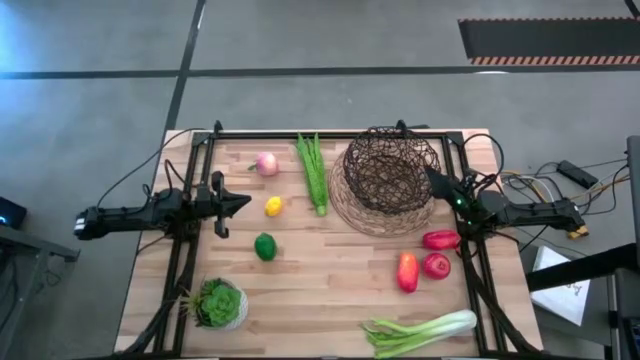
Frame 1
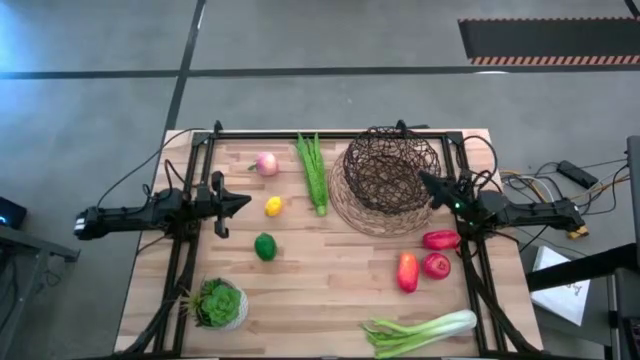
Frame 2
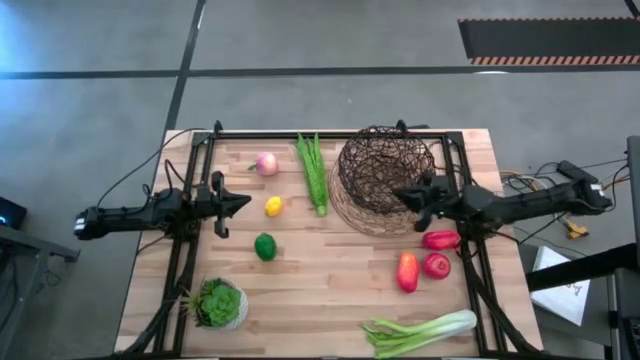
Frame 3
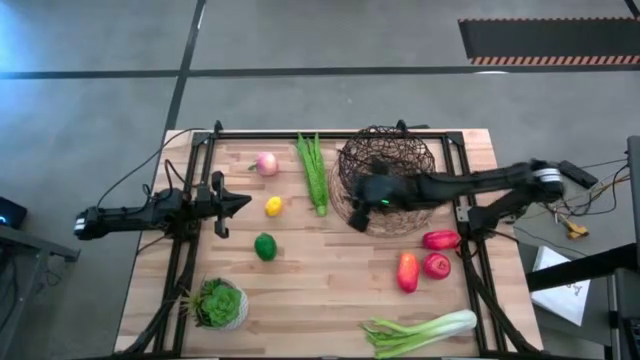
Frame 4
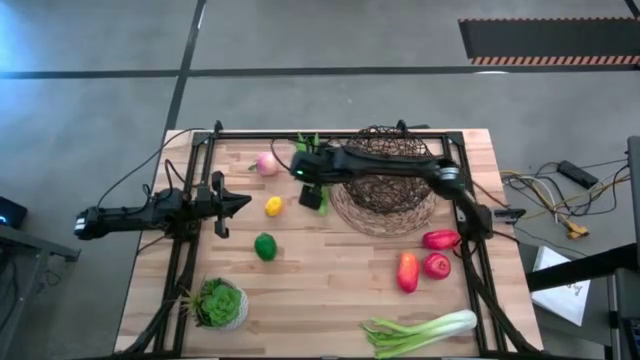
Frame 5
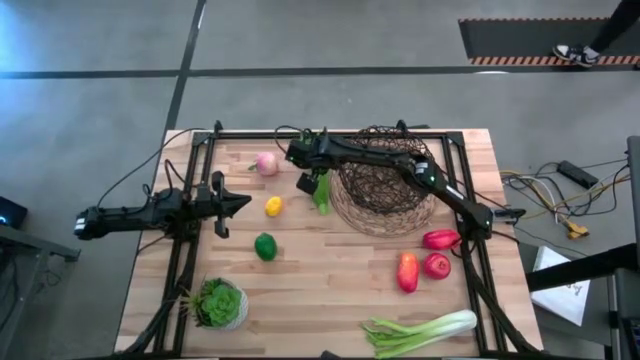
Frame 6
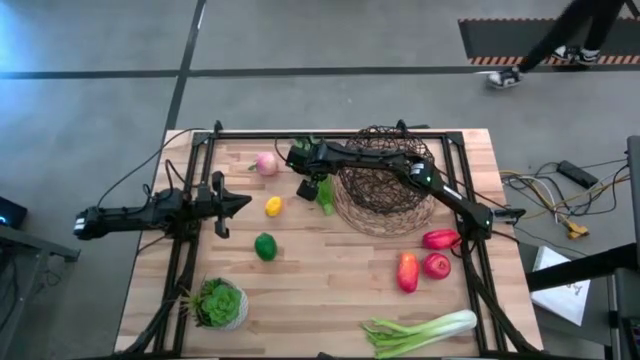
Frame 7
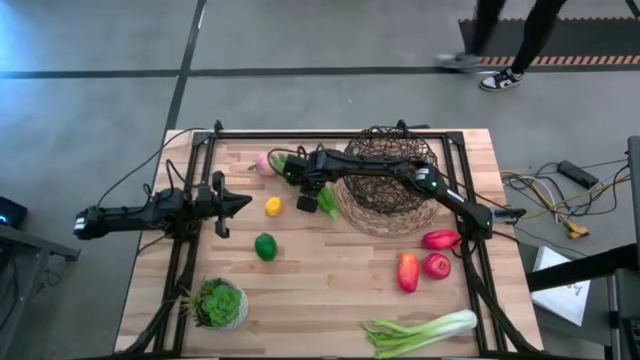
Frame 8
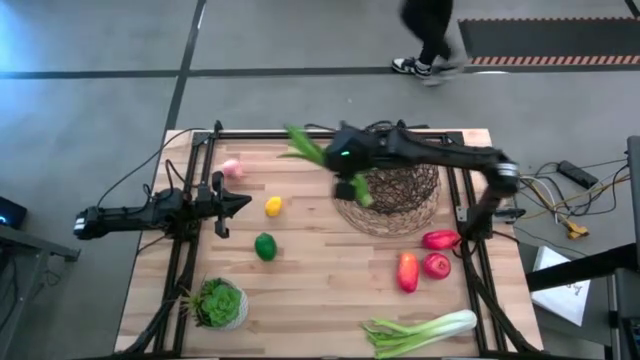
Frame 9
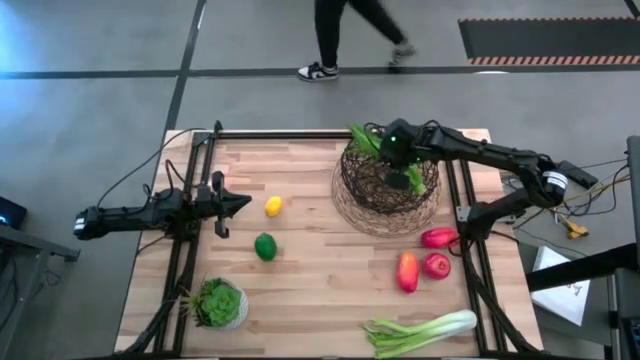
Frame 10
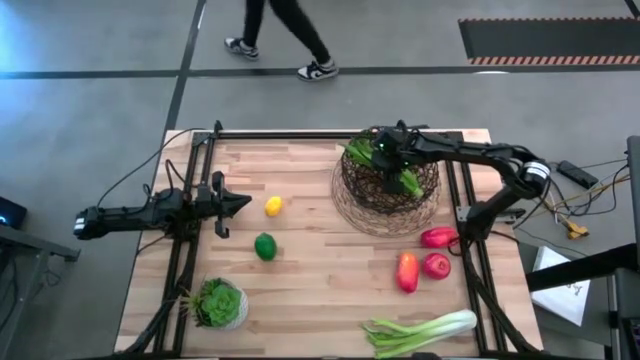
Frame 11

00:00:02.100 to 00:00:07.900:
Task: Build produce basket
Put the green lettuce into the wire basket

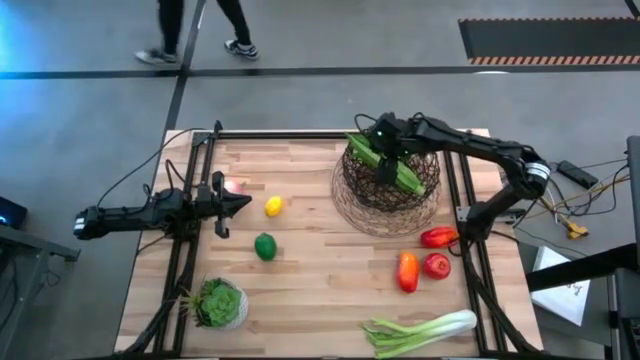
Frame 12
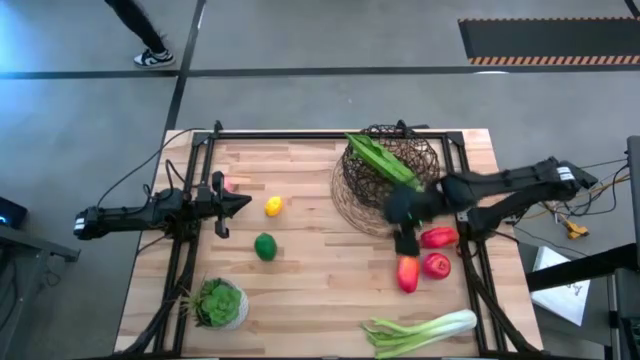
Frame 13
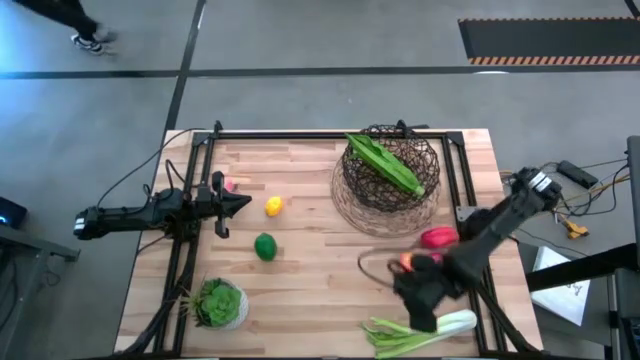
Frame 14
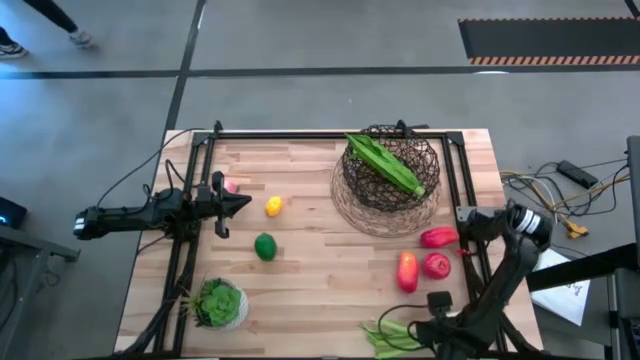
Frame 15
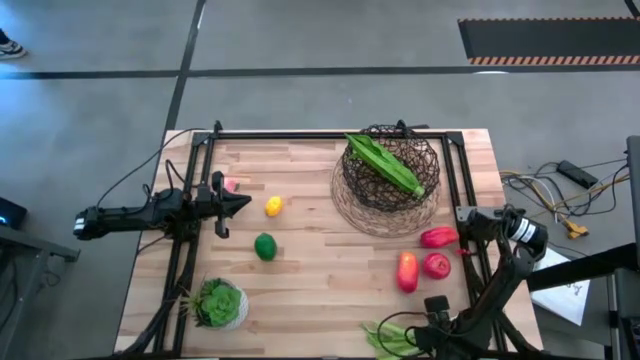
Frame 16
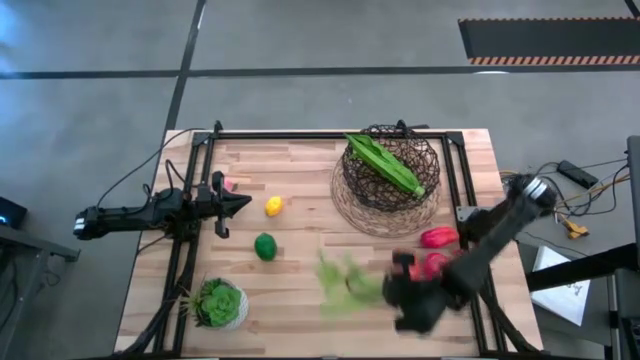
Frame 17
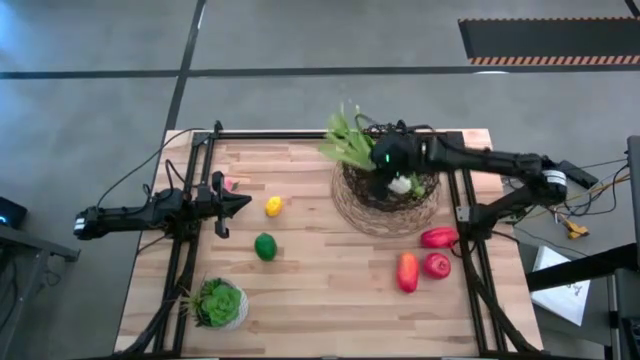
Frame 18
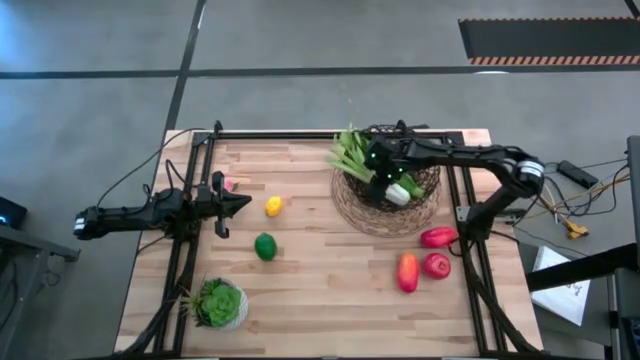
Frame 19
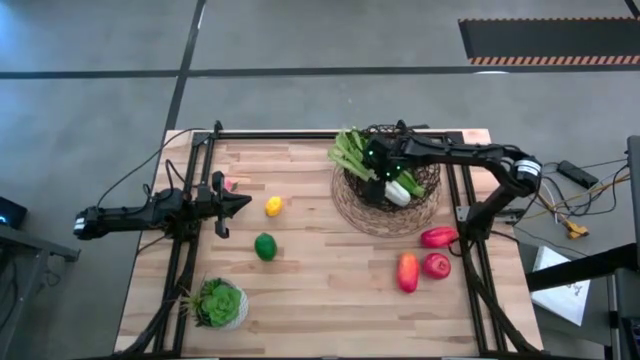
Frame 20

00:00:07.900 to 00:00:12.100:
Put the green celery into the wire basket

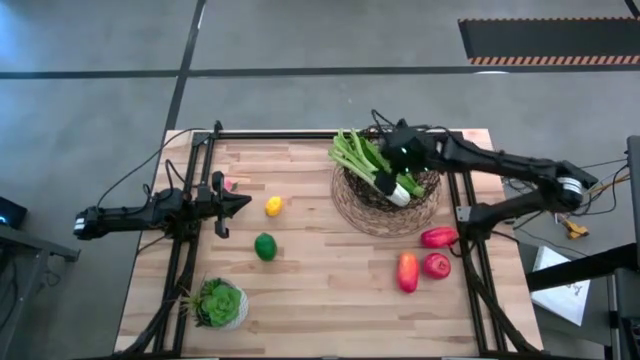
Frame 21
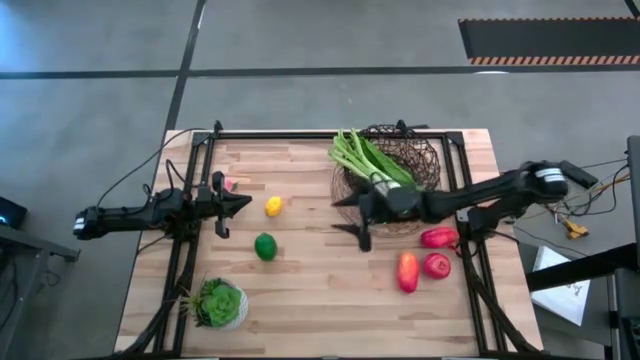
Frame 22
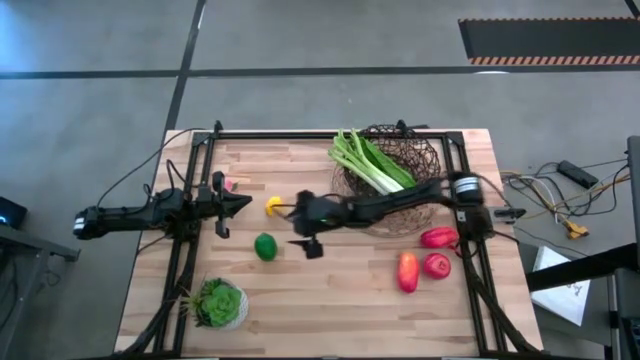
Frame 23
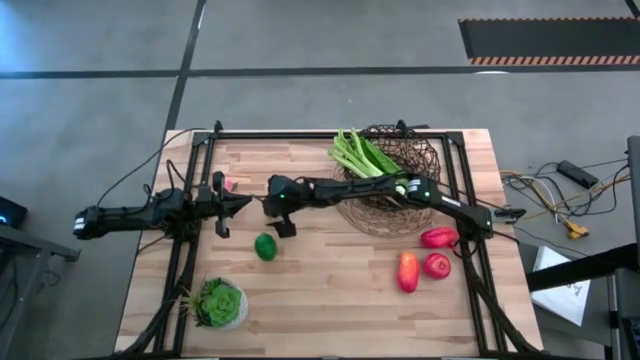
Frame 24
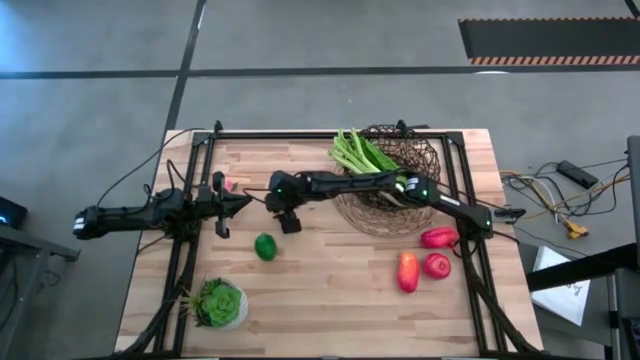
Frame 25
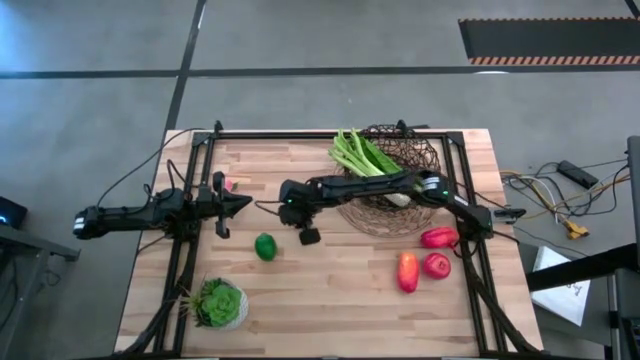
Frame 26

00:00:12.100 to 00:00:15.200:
Put the yellow lemon into the wire basket

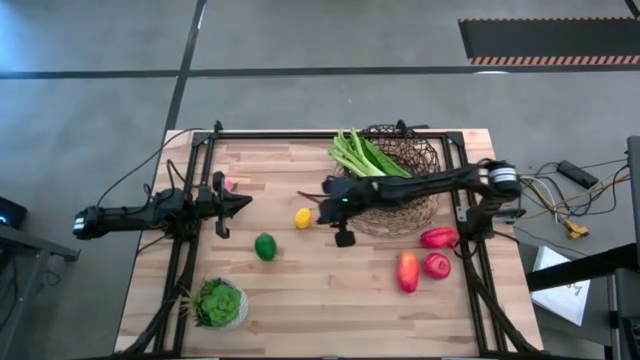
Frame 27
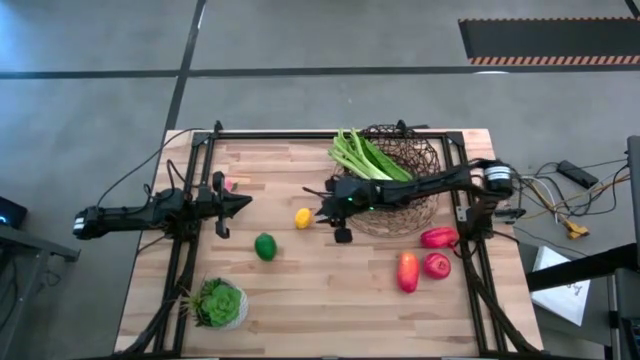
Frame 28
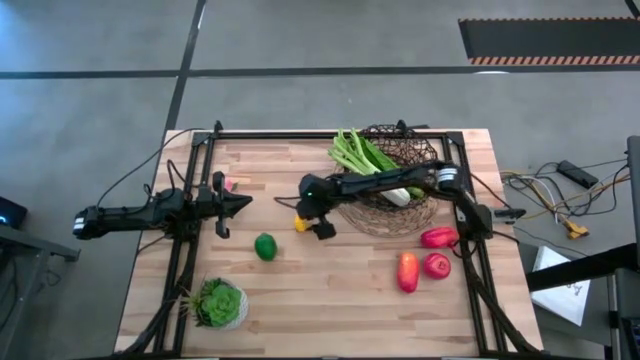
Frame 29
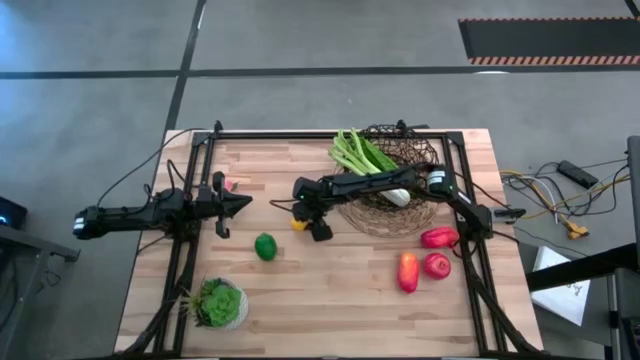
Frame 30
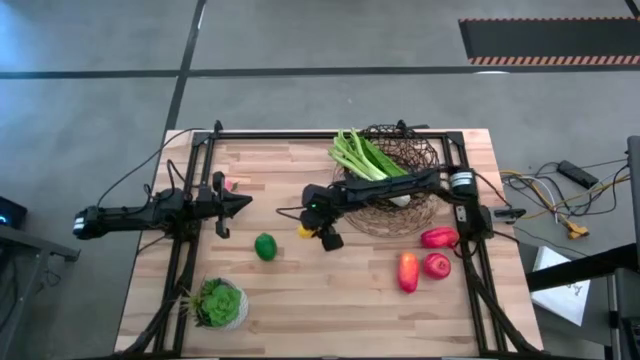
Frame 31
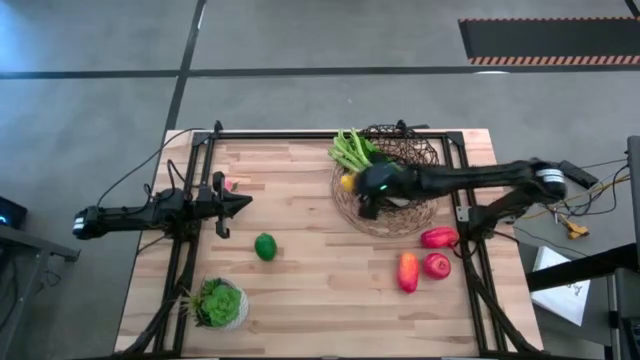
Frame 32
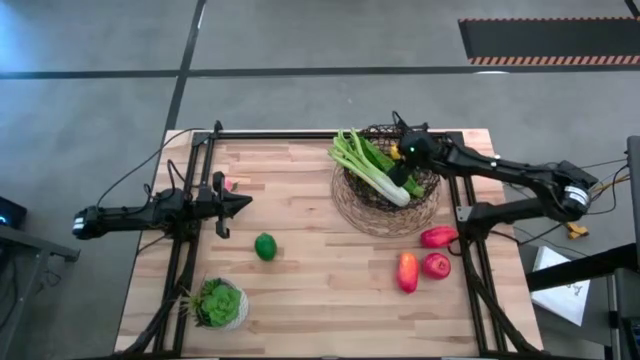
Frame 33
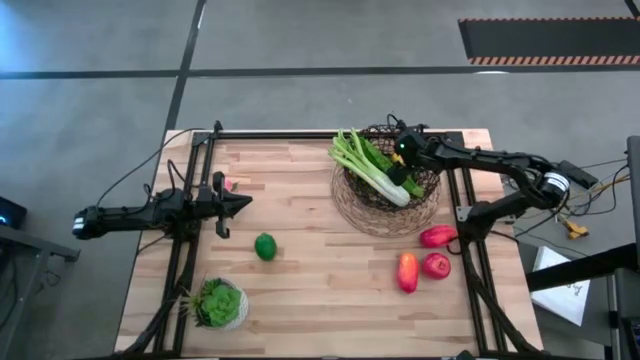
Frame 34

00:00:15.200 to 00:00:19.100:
Put the yellow lemon into the wire basket

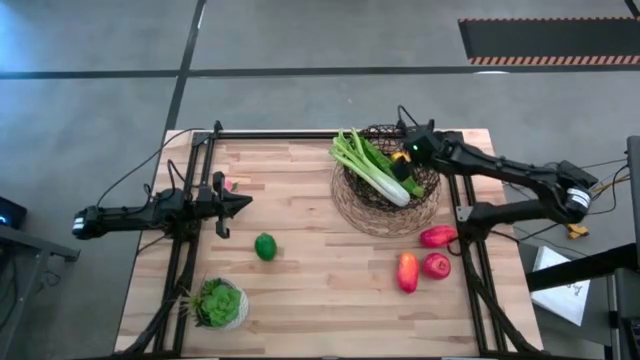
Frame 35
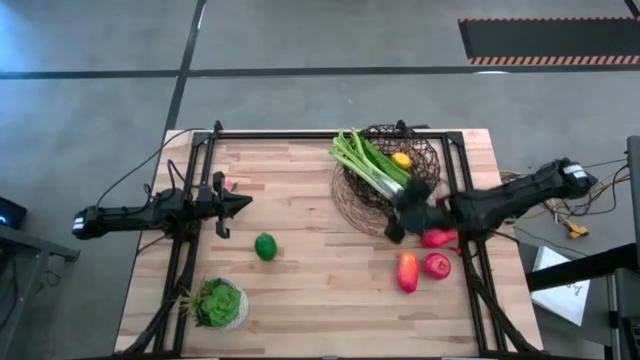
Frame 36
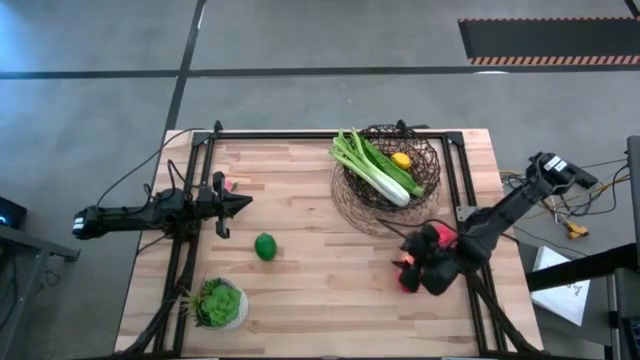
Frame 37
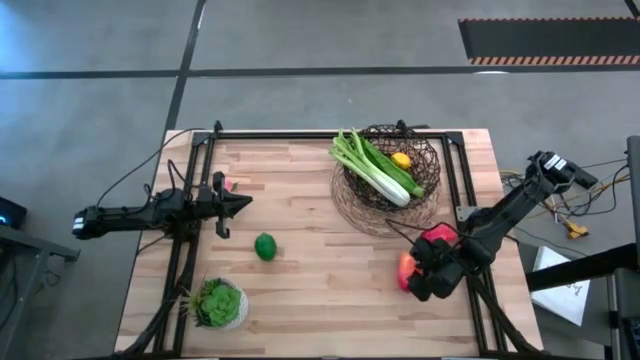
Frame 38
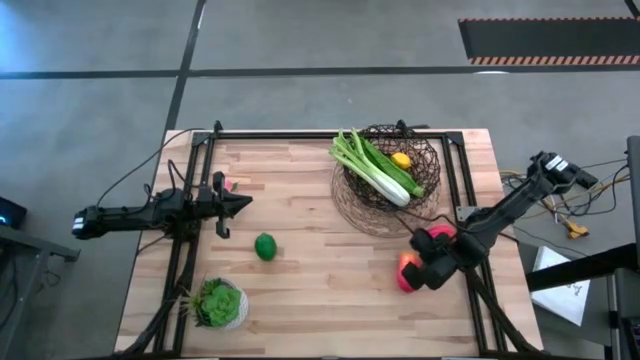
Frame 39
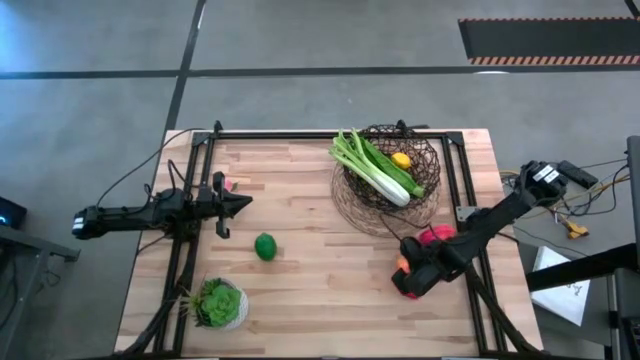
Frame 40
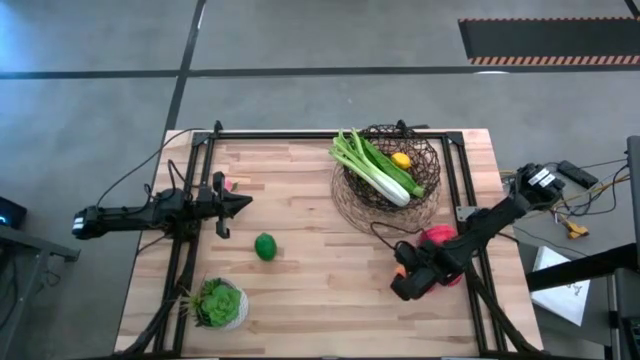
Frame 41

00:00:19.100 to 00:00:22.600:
Put the left mango into the wire basket

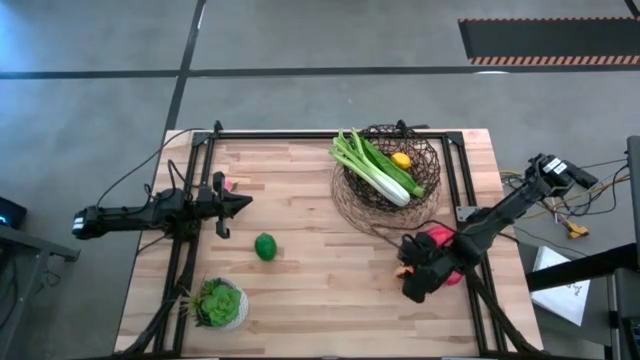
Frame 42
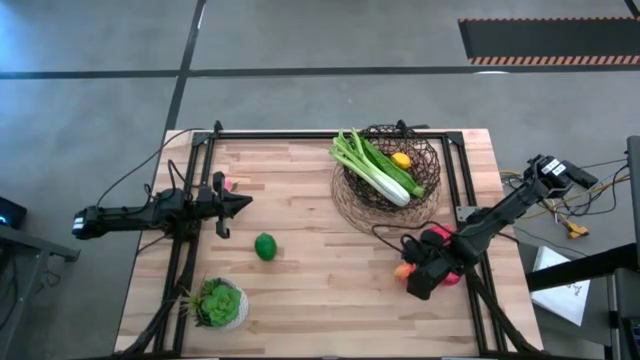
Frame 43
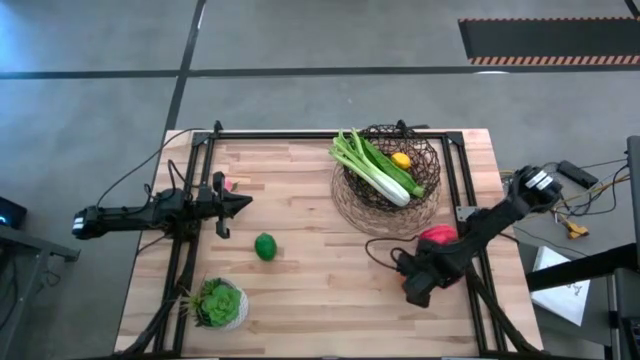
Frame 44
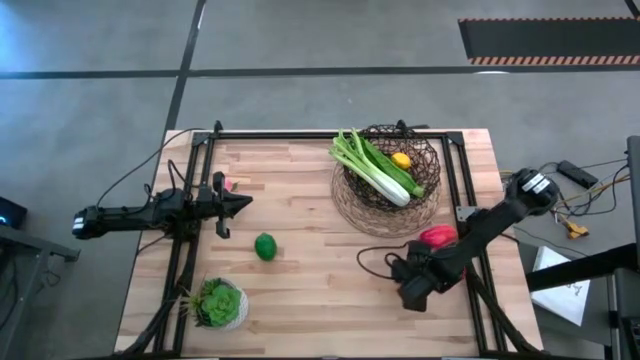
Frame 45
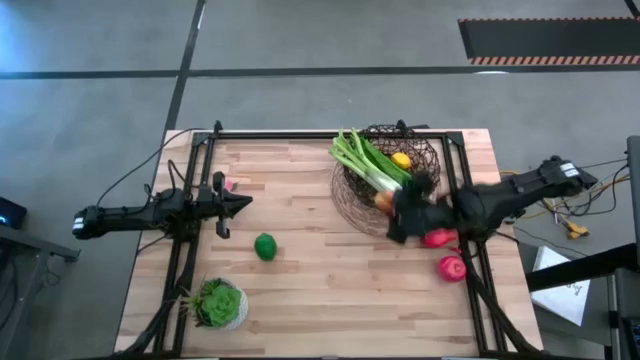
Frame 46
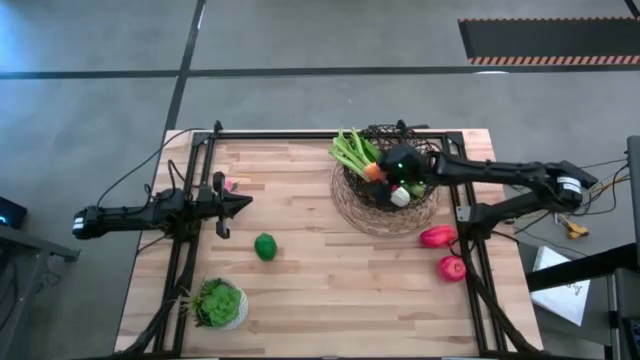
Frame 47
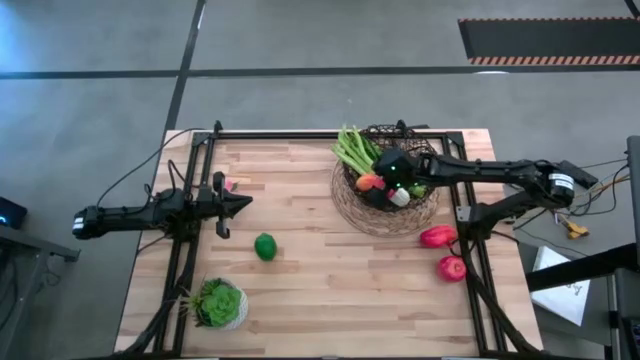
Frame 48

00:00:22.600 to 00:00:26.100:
Put the left orange mango into the wire basket
